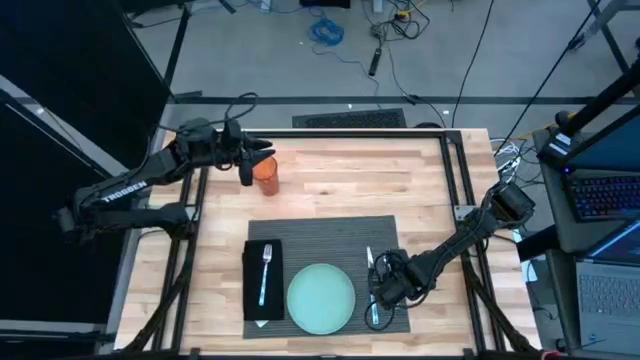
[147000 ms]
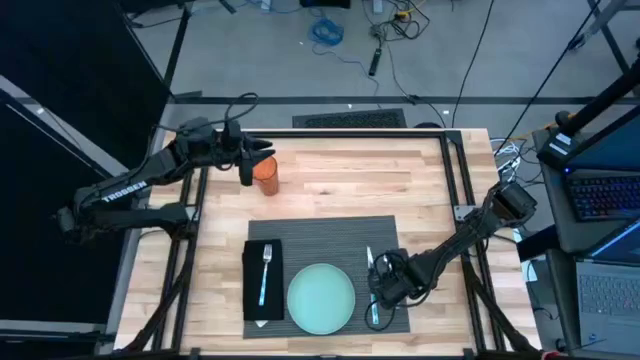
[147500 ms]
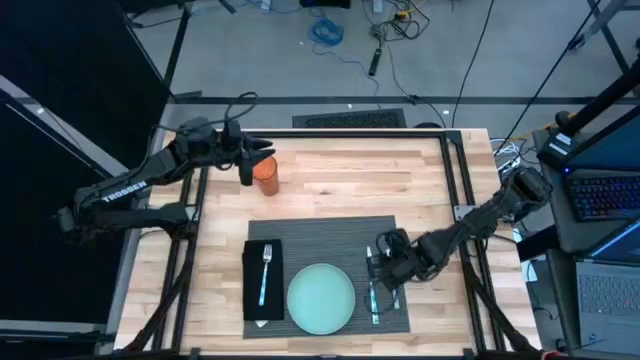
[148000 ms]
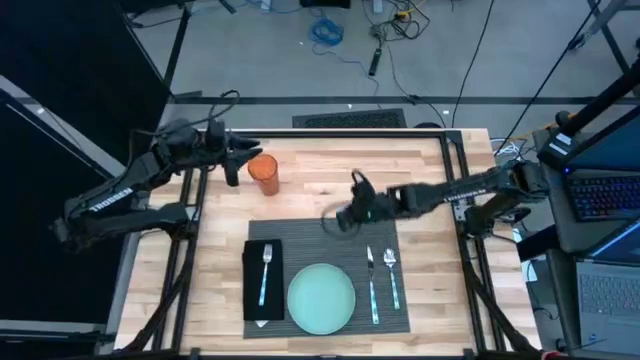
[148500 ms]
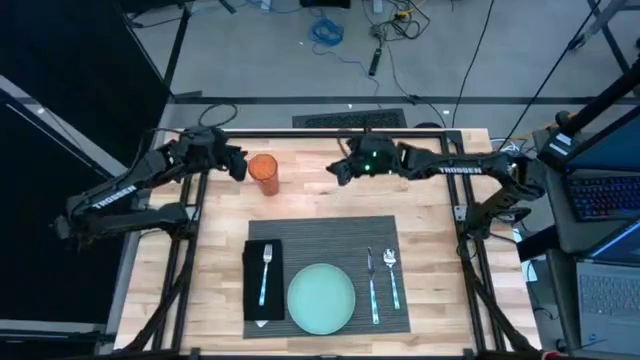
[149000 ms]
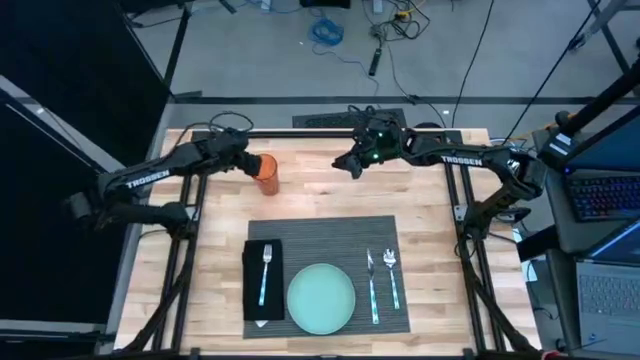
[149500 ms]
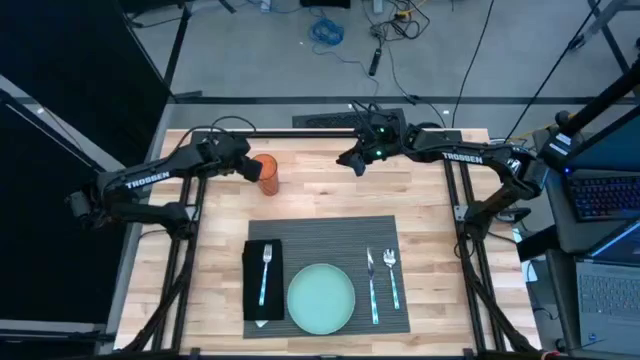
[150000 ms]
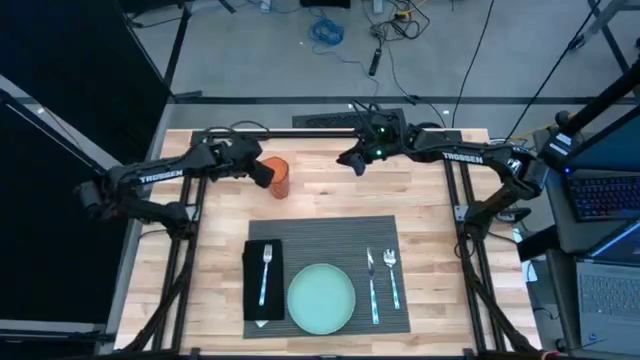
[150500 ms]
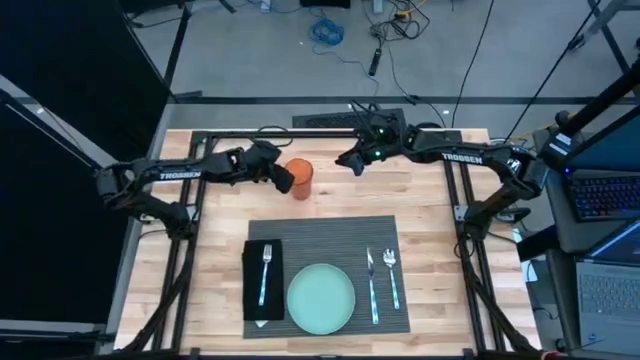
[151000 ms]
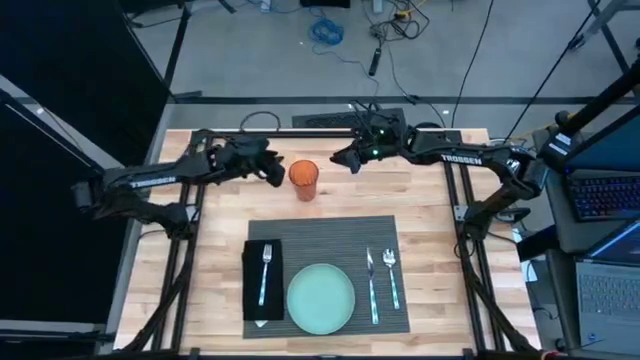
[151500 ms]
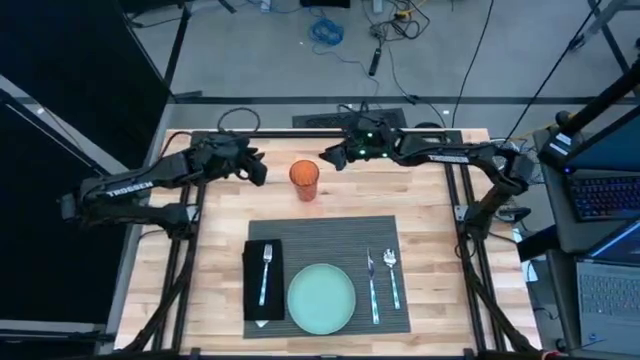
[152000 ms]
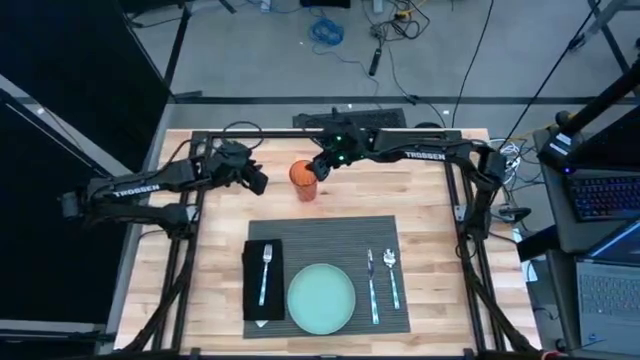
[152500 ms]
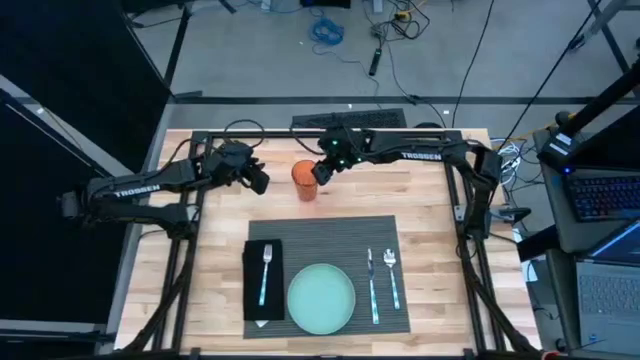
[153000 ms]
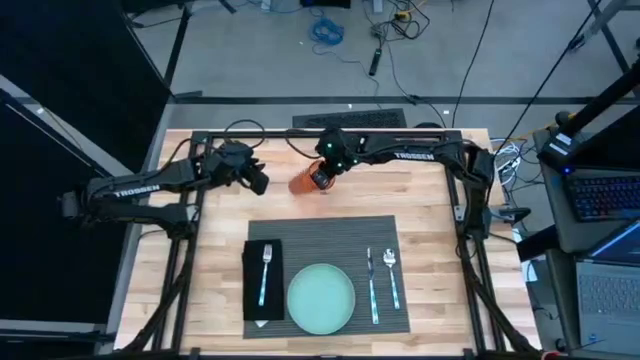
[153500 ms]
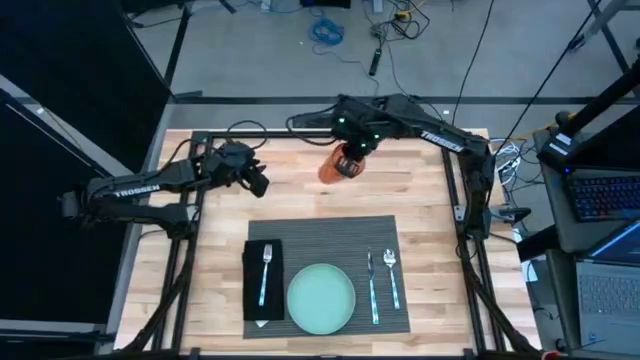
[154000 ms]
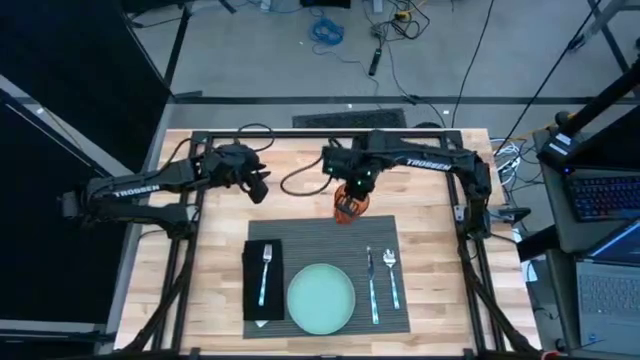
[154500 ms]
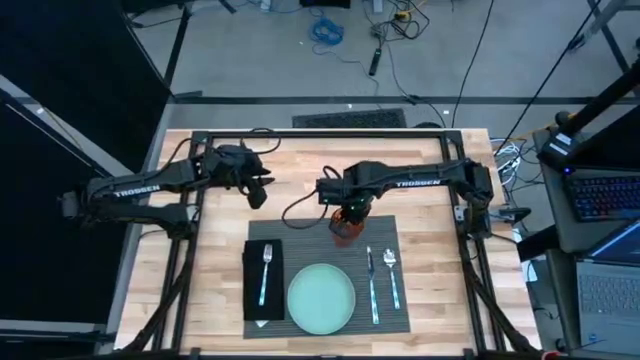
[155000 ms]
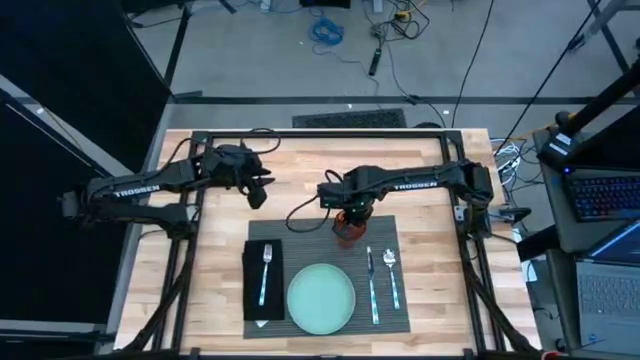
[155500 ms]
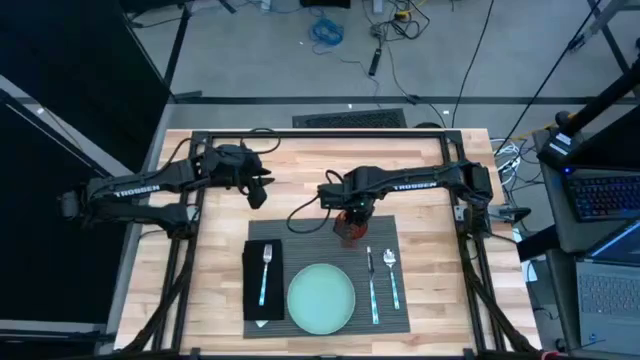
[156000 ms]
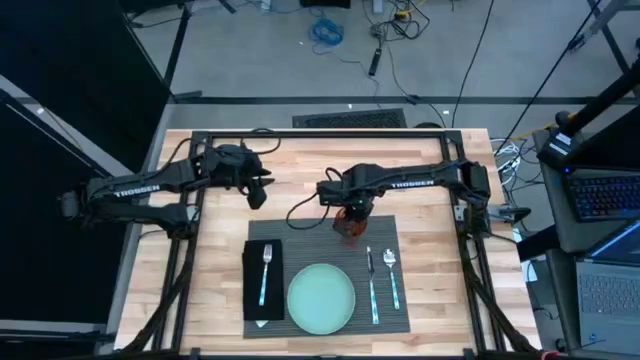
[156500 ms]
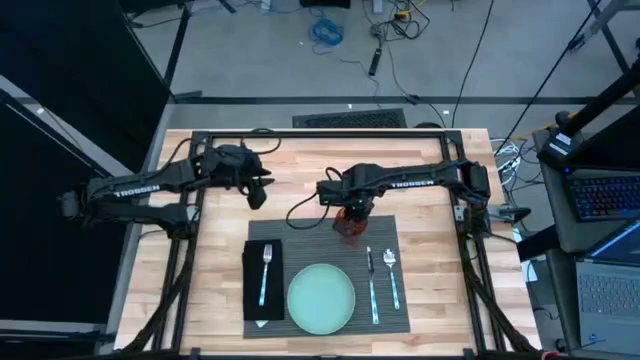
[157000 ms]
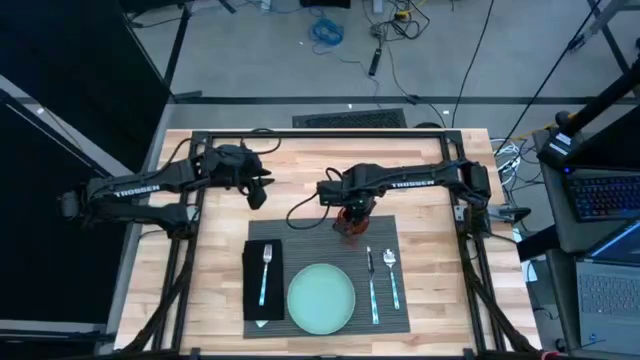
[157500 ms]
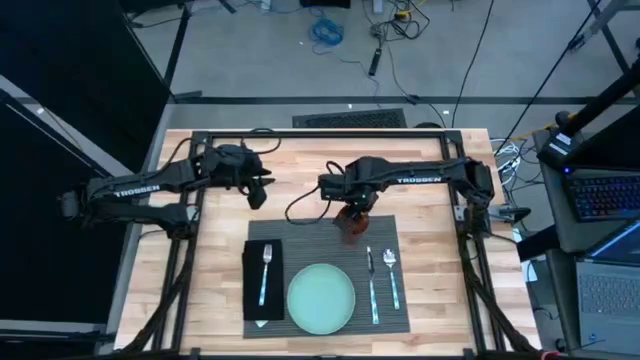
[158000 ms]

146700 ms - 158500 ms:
Task: Set table place
Put the orange cup on the gray table mat

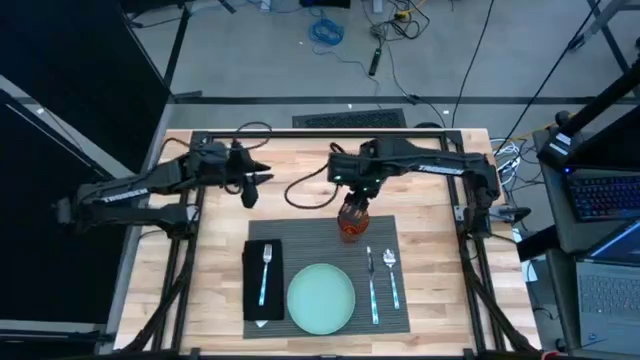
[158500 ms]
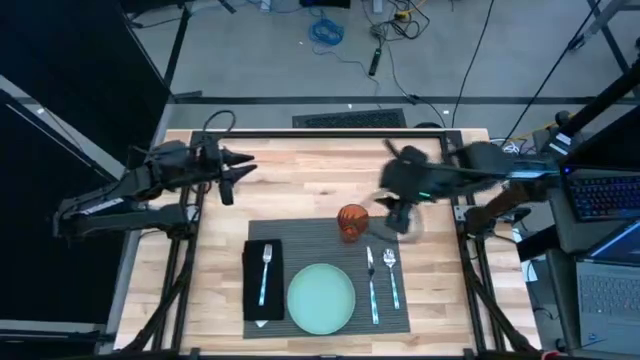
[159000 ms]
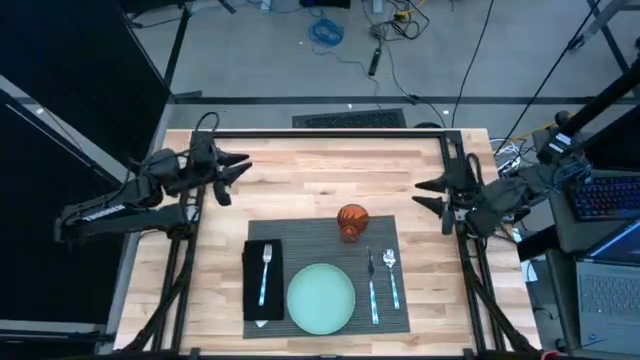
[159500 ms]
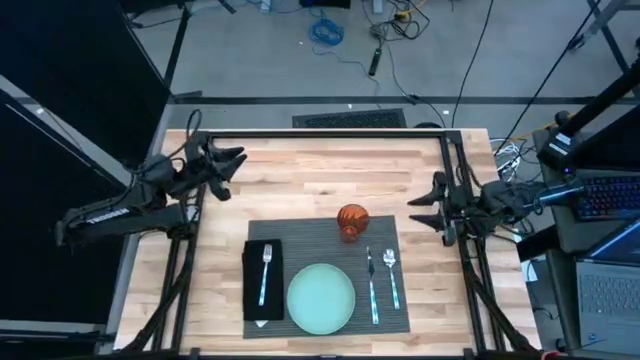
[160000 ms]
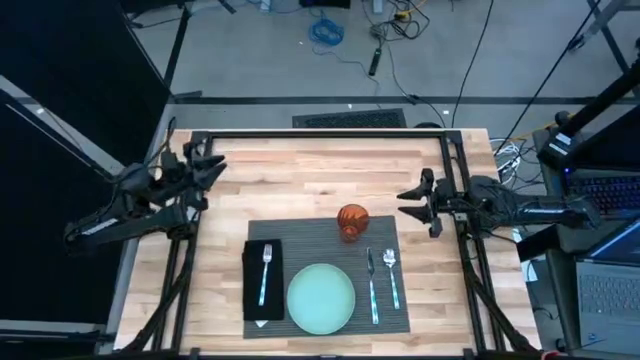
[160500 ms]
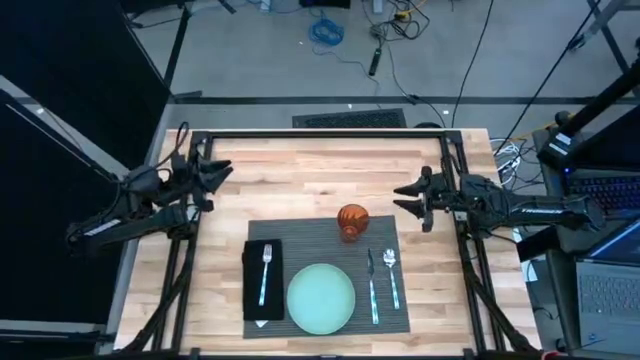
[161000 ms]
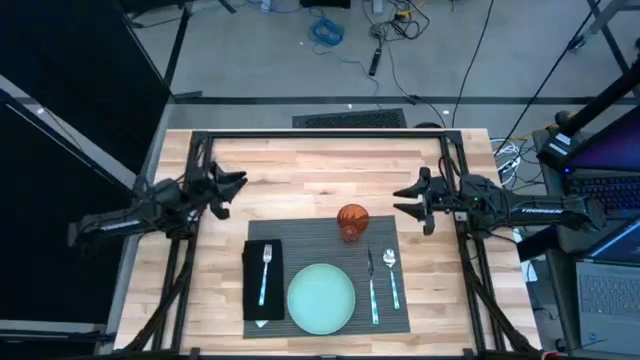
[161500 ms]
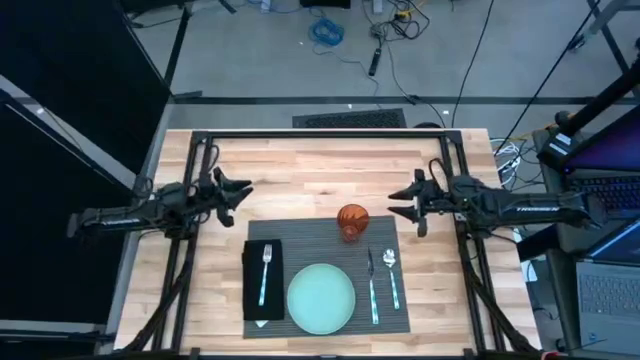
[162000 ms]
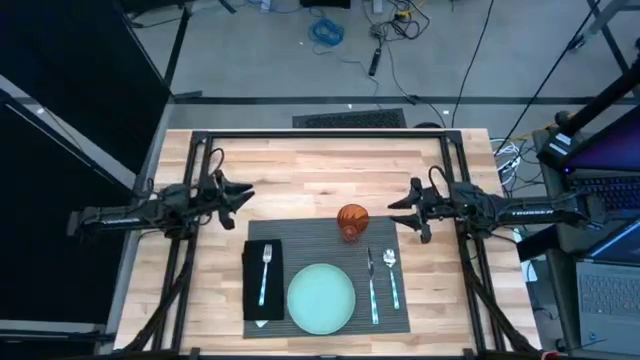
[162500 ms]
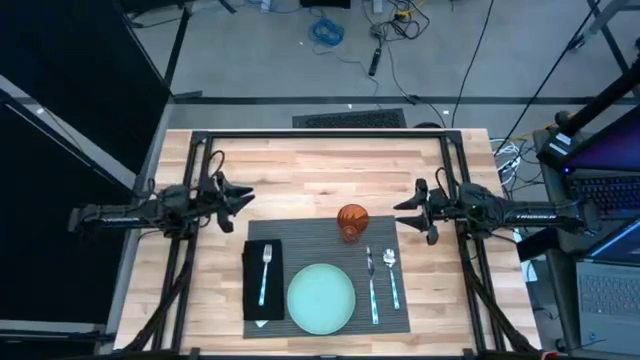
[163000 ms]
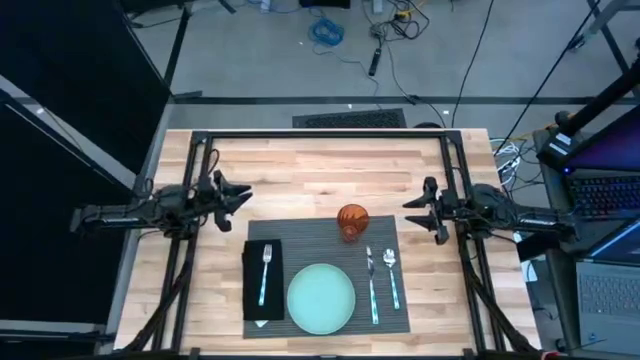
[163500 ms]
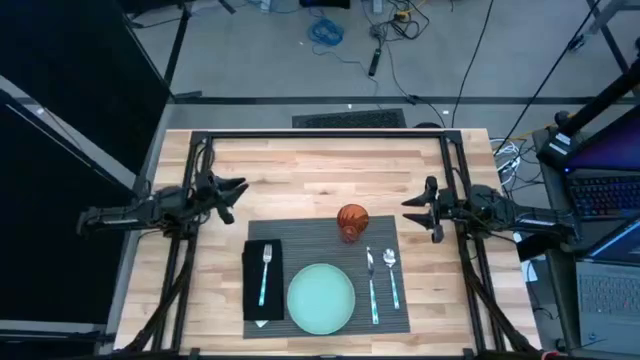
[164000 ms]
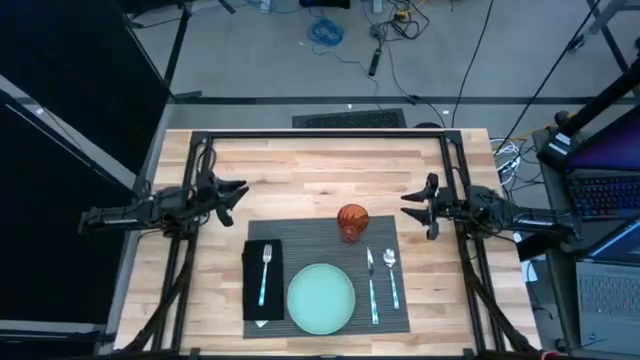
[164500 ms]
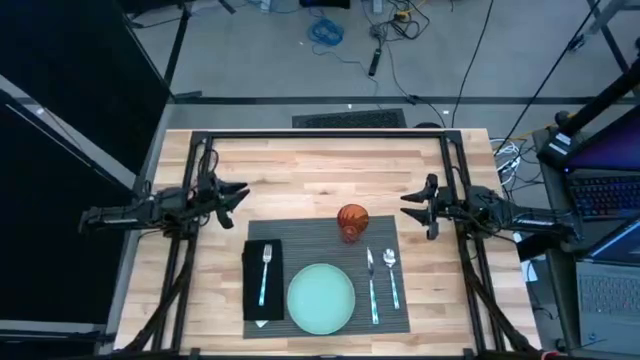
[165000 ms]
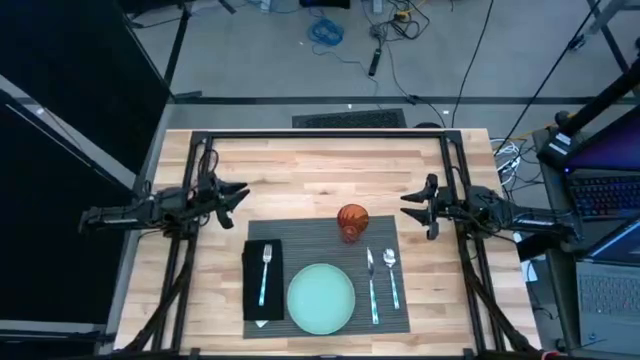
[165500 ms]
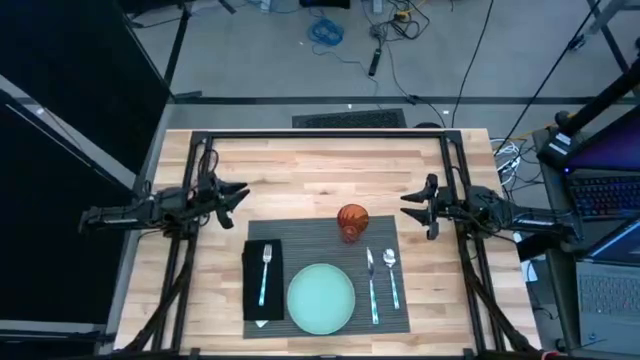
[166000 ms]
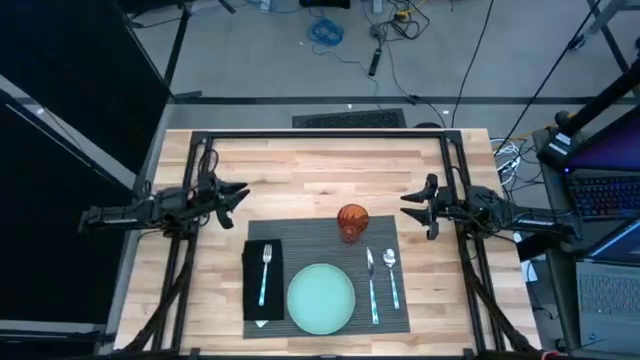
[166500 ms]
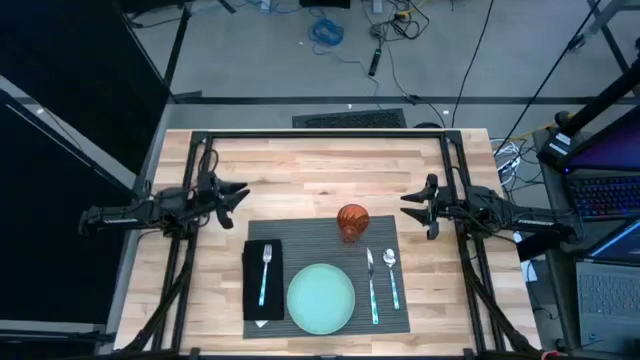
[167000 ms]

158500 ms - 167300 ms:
Return to Home Position

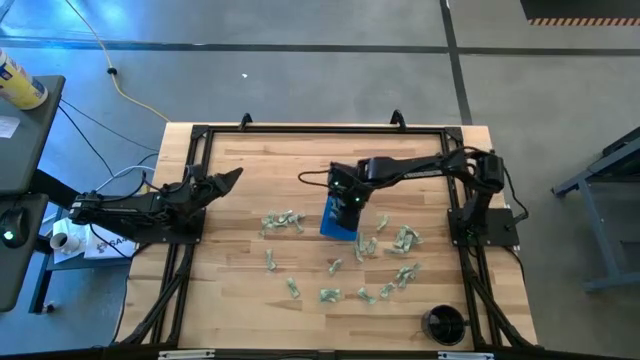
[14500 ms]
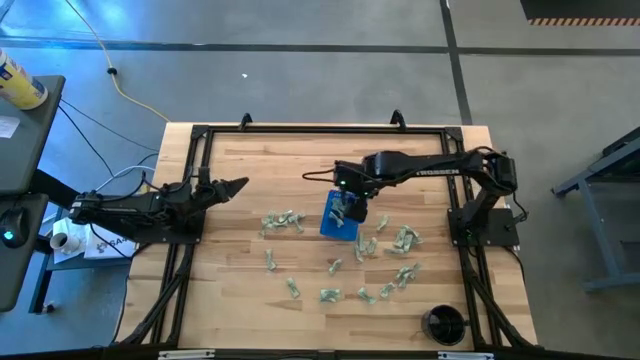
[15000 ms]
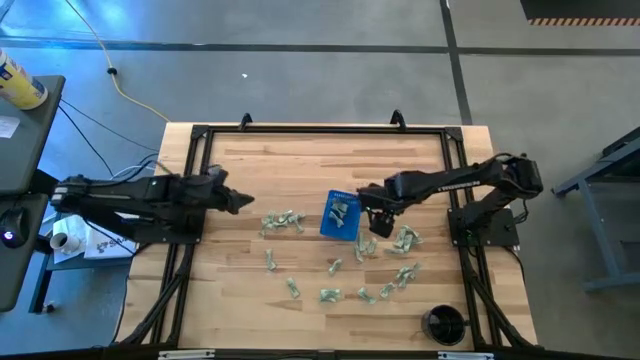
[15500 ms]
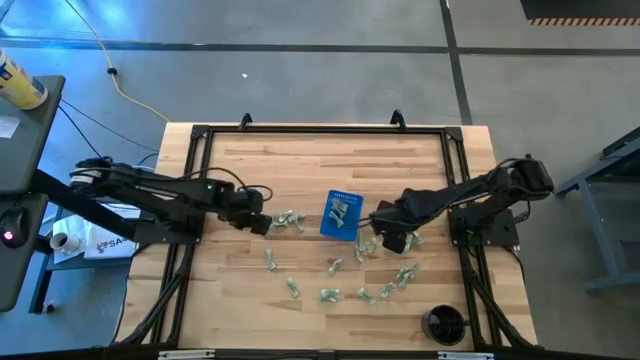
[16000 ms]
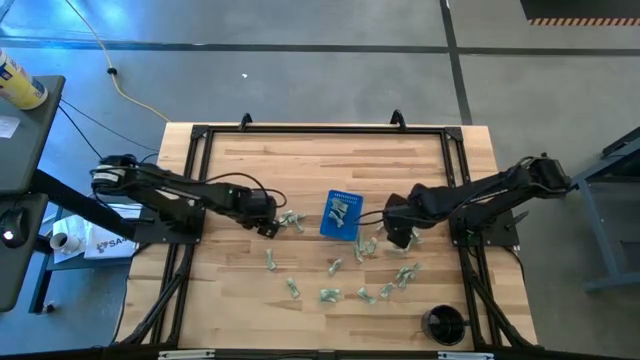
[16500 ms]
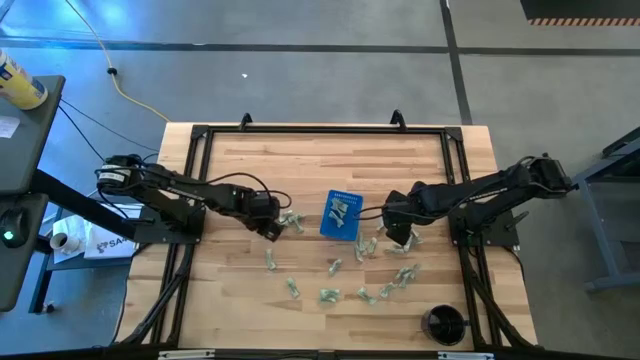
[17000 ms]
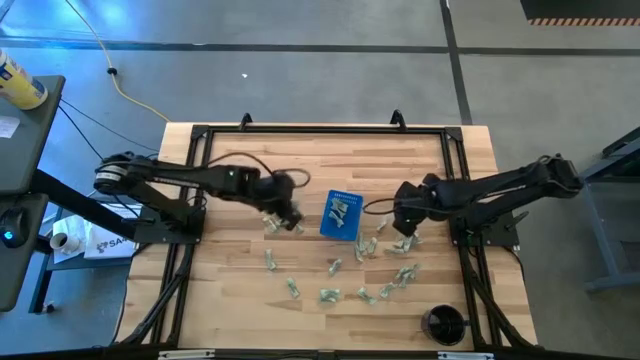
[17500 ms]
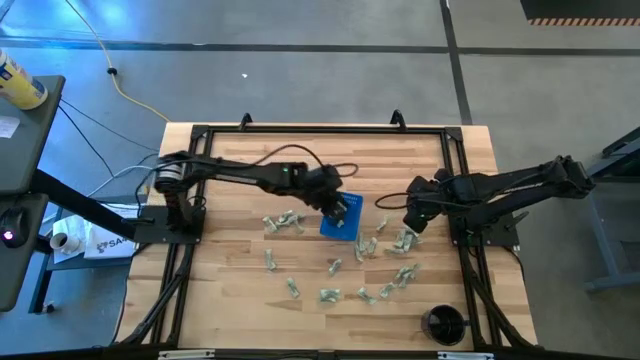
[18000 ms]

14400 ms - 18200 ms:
Task: Pick and place Stevia / Truvia into bins
Put the stevia packet into the blue basket
